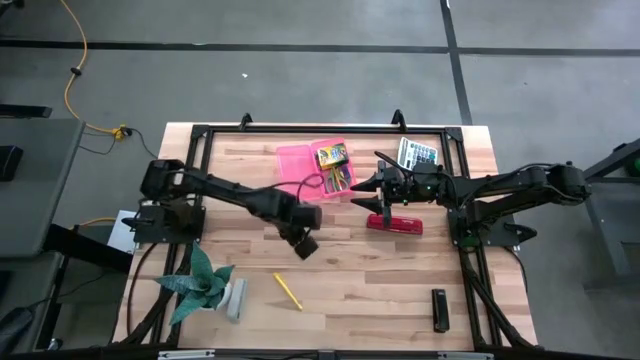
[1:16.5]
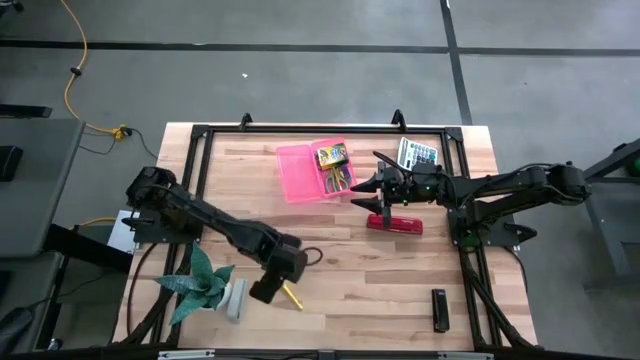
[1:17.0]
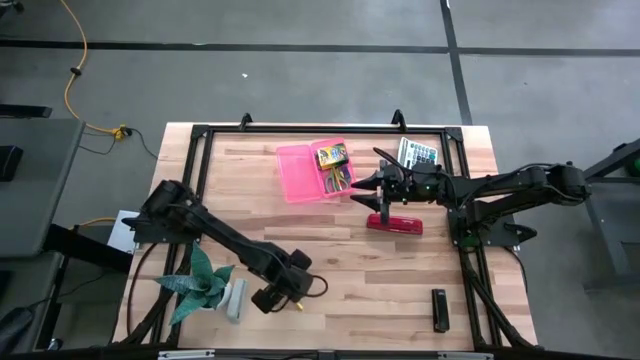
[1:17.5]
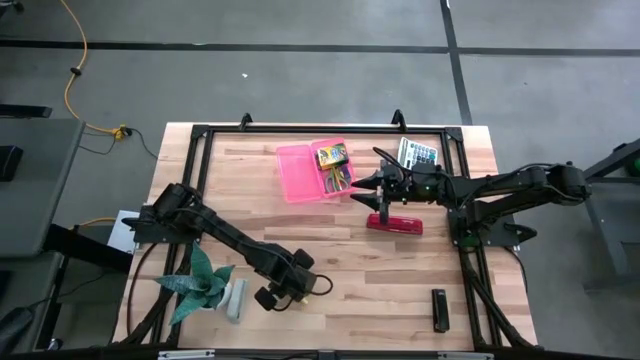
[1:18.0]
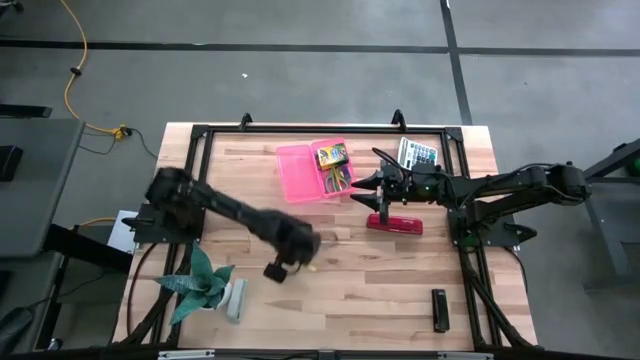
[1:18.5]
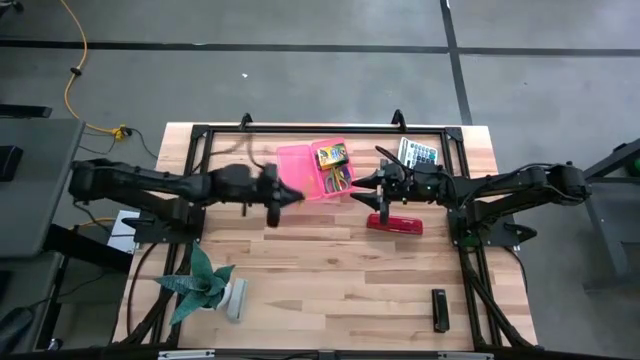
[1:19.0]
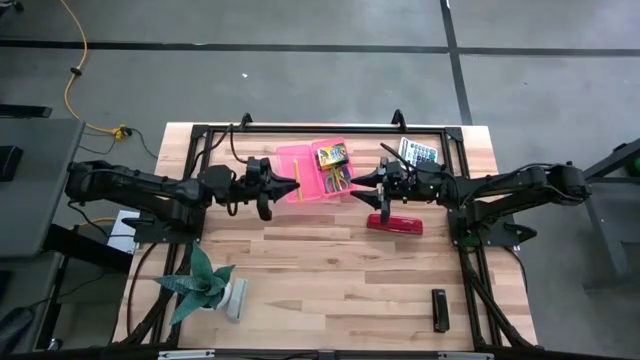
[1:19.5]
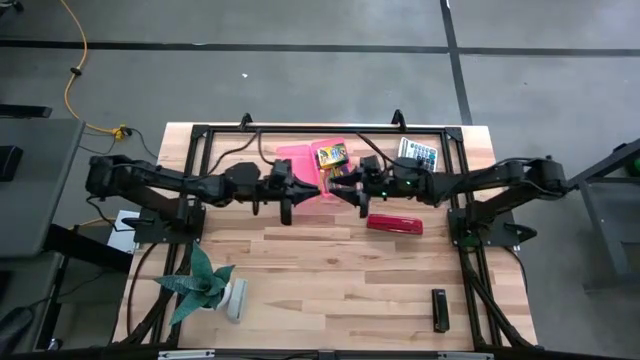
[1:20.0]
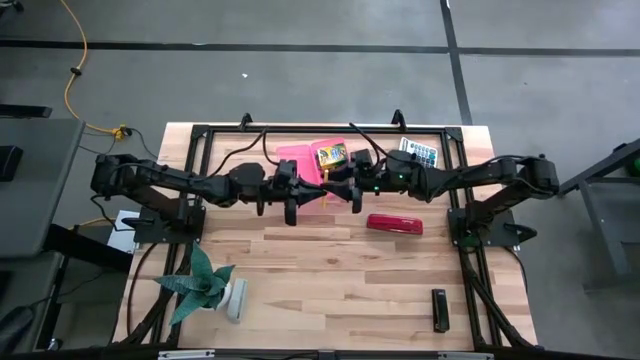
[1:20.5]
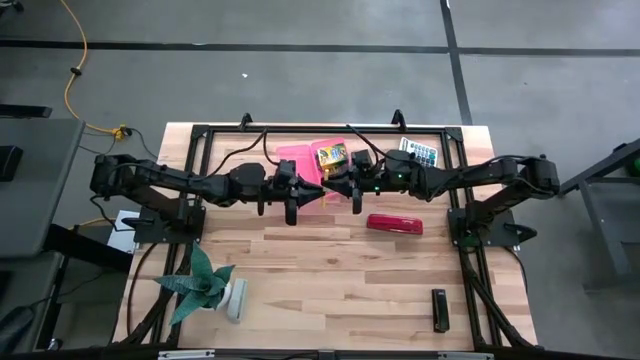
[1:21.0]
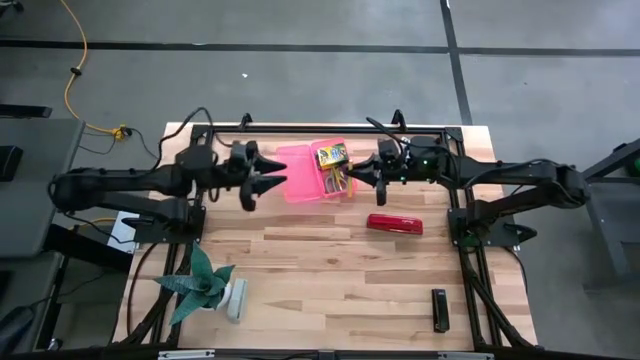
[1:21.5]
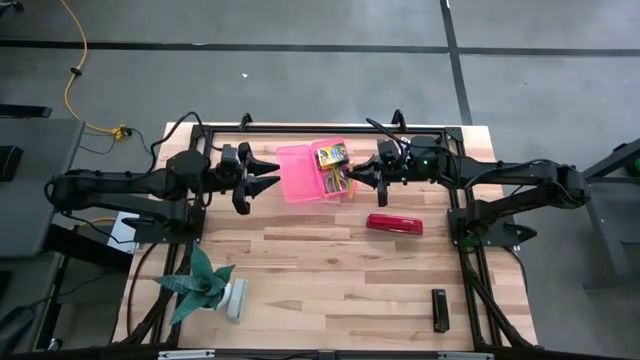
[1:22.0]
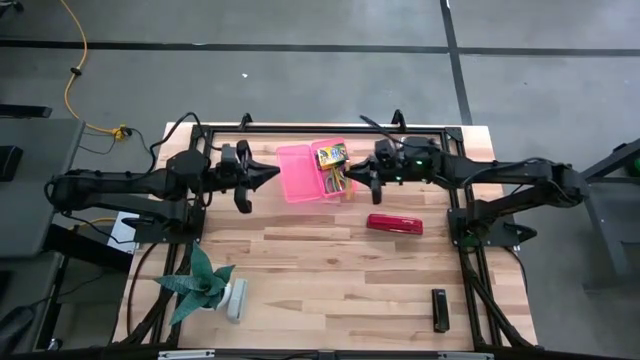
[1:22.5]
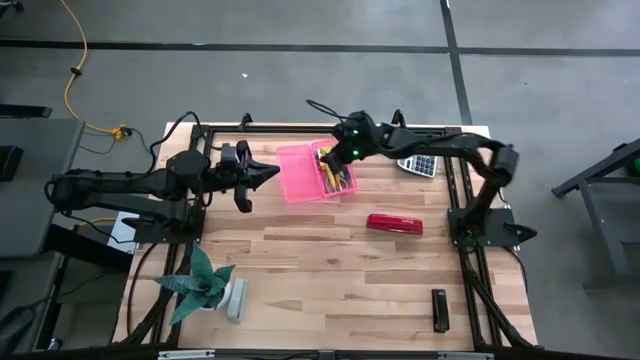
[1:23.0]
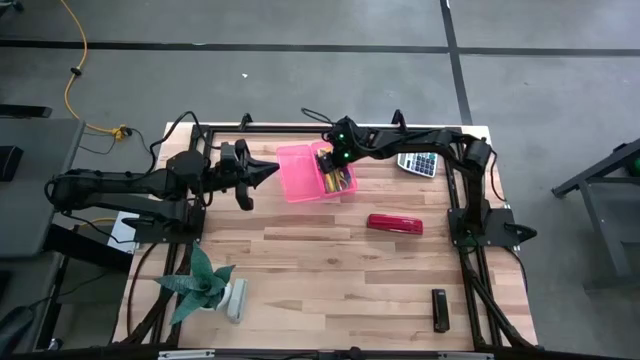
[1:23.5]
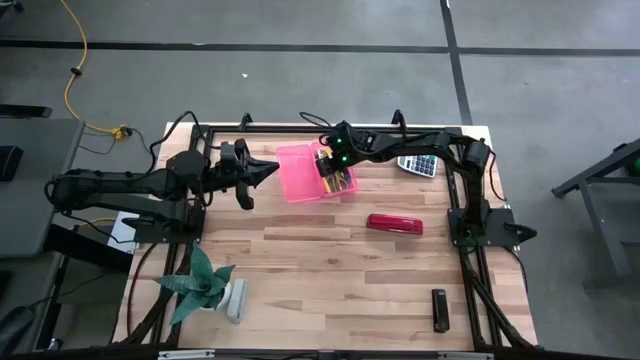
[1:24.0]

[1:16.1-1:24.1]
Task: Pack school essentials
Put the yellow pen into the pink supply box

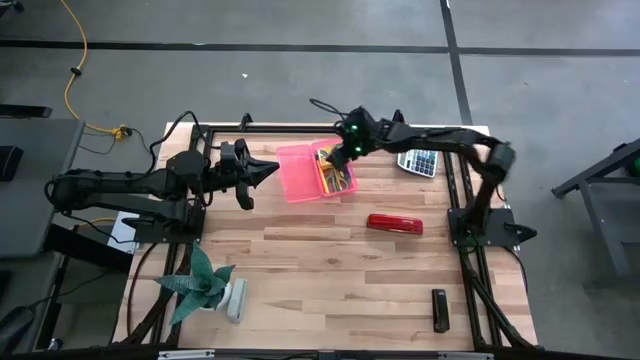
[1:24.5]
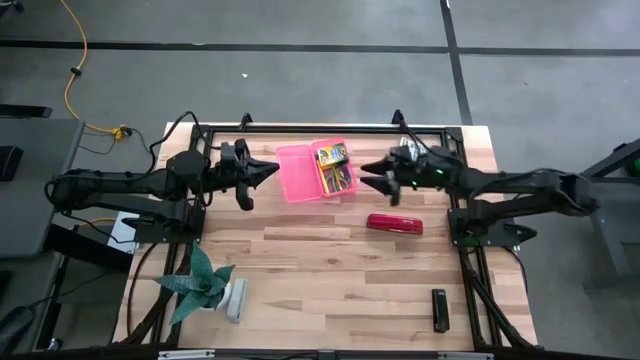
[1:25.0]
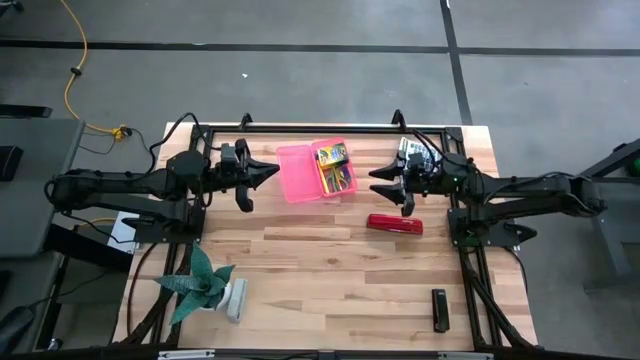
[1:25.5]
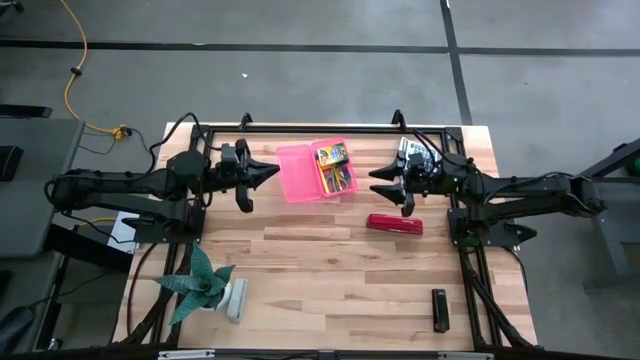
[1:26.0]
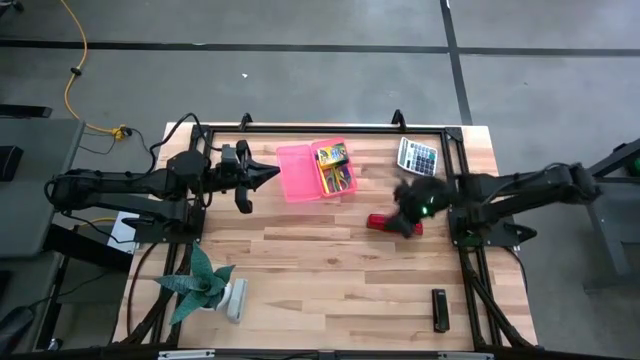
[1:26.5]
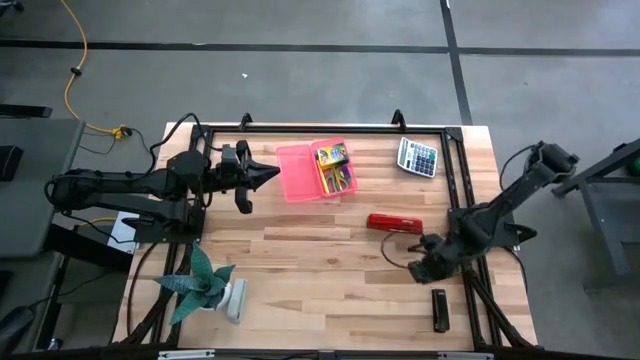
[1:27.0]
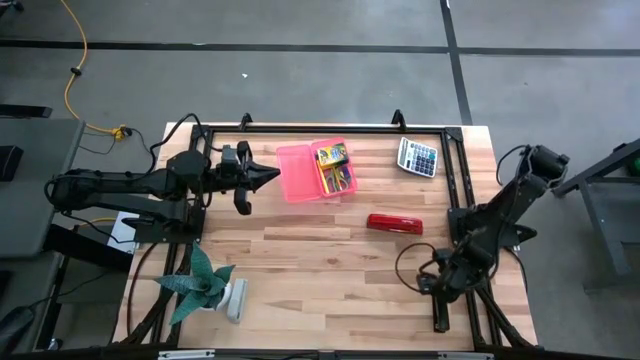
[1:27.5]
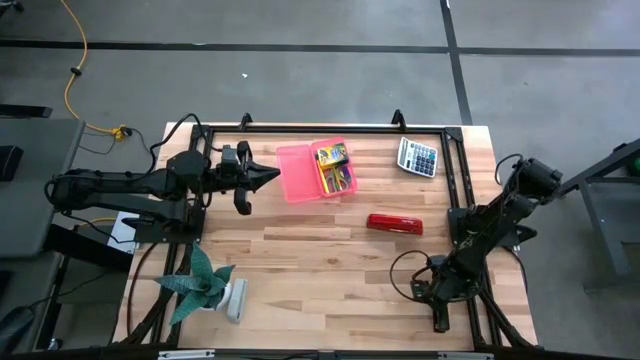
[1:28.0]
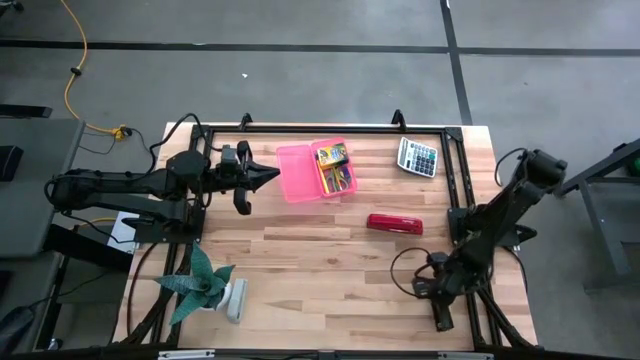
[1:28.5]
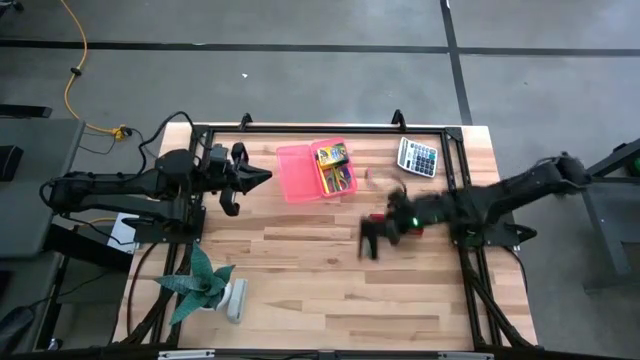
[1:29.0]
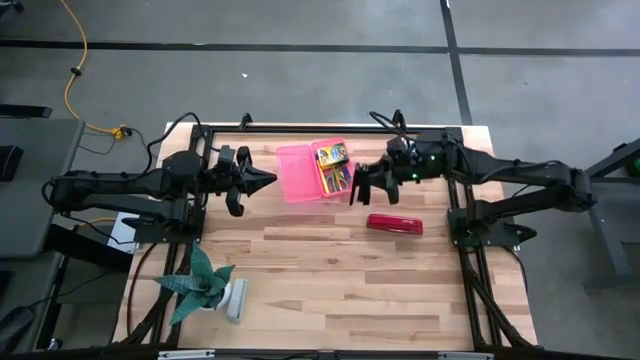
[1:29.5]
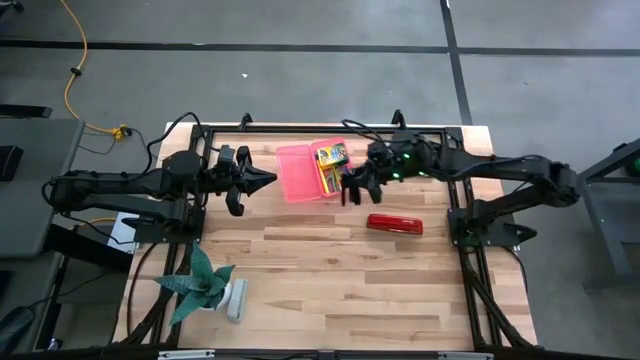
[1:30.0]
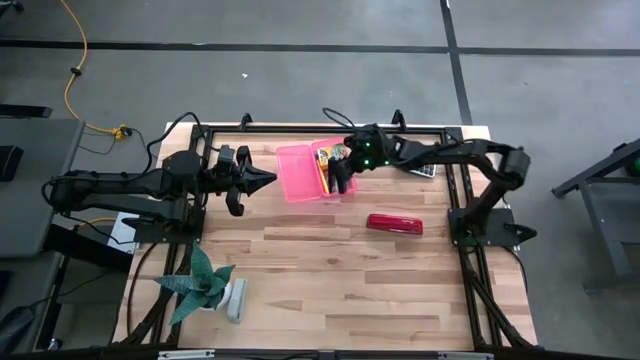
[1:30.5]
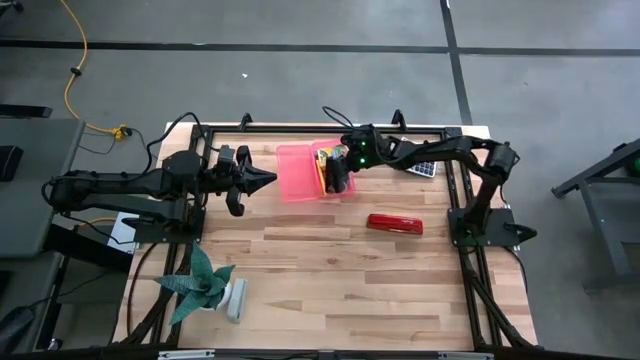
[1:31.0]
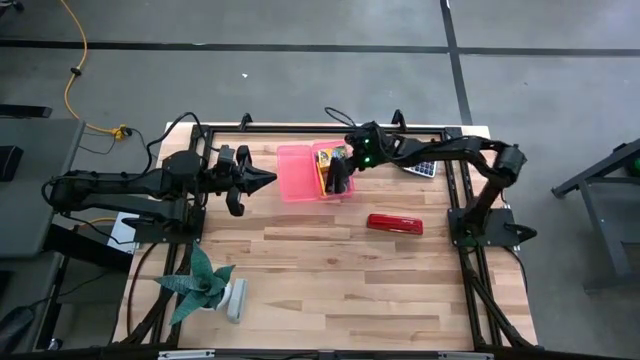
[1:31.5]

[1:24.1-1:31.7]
Put the black stapler into the pink supply box

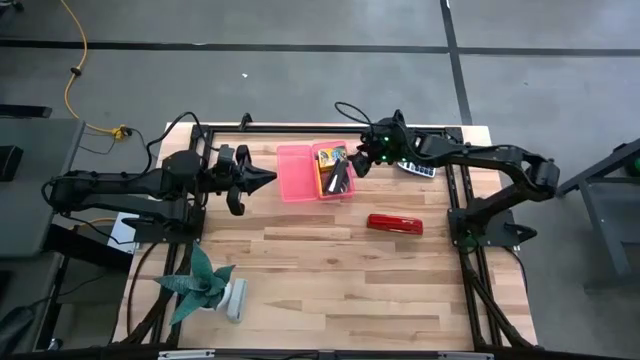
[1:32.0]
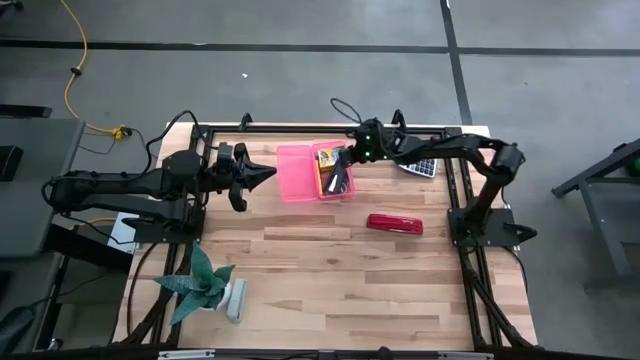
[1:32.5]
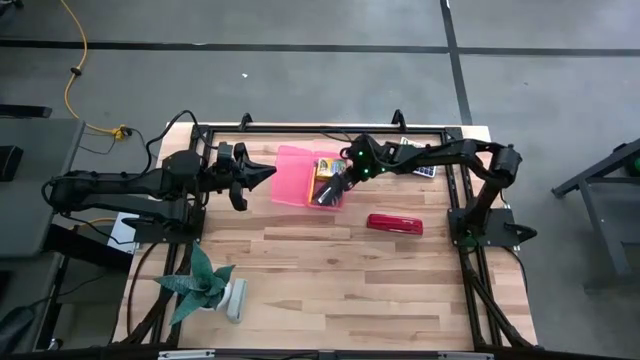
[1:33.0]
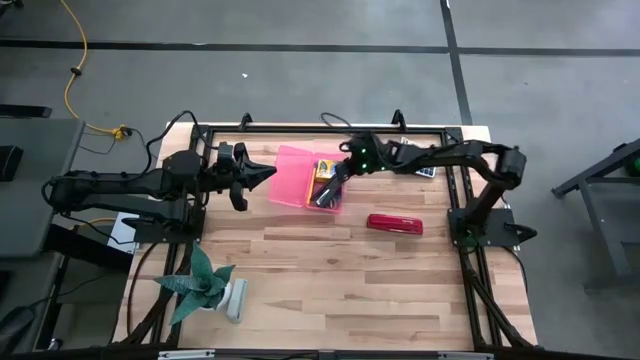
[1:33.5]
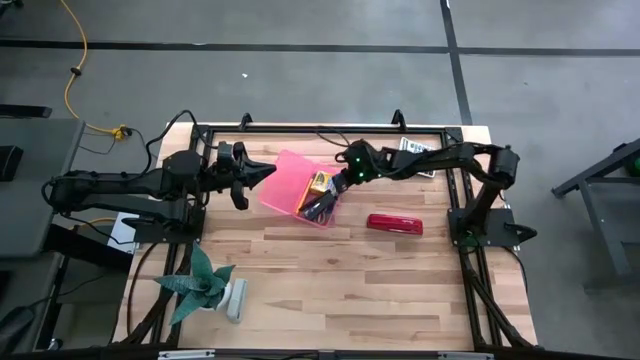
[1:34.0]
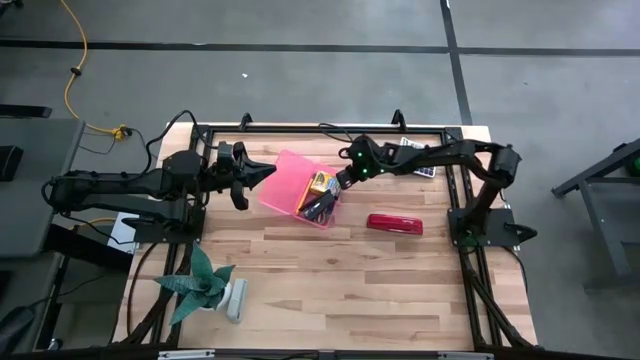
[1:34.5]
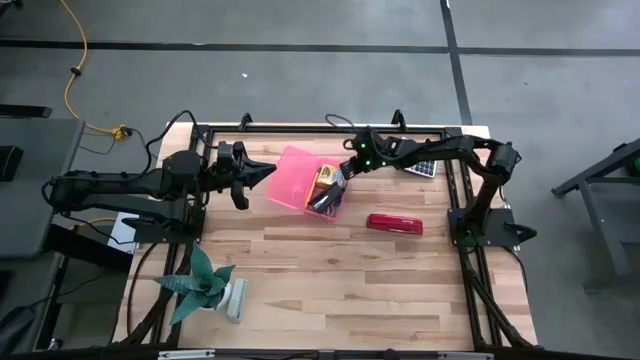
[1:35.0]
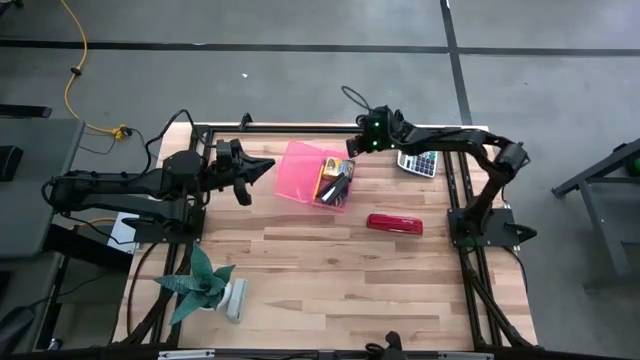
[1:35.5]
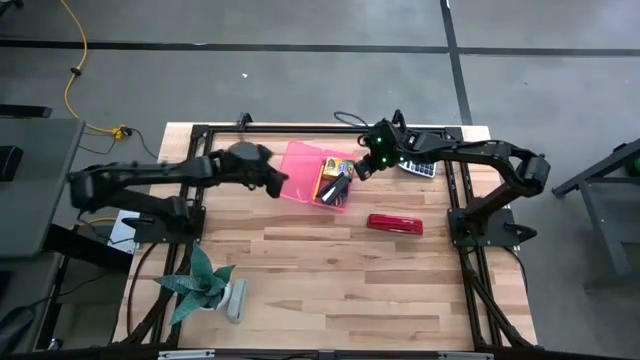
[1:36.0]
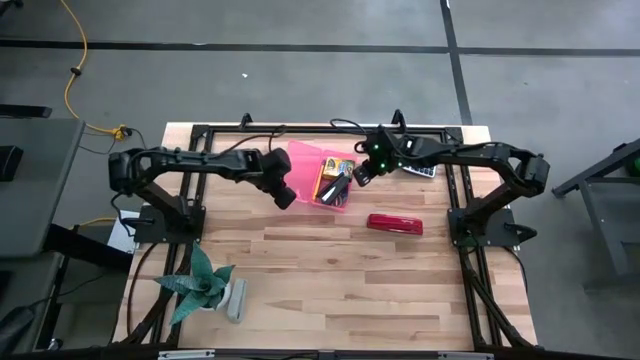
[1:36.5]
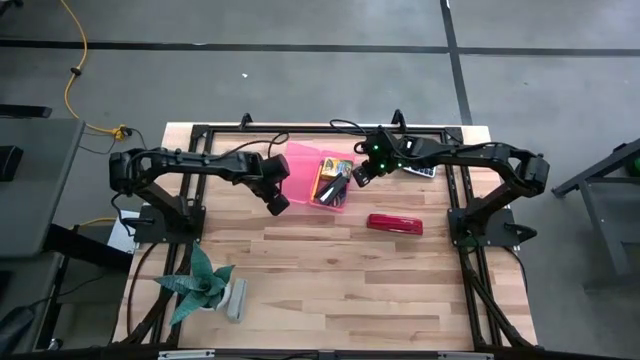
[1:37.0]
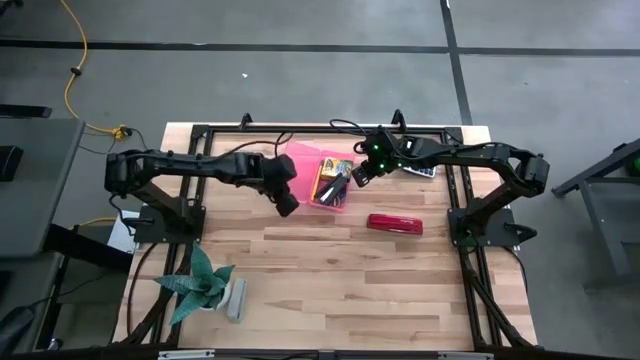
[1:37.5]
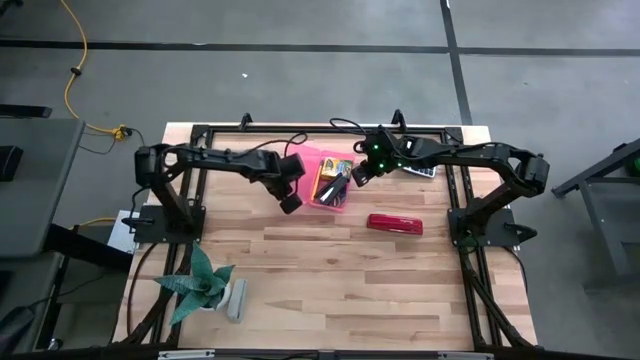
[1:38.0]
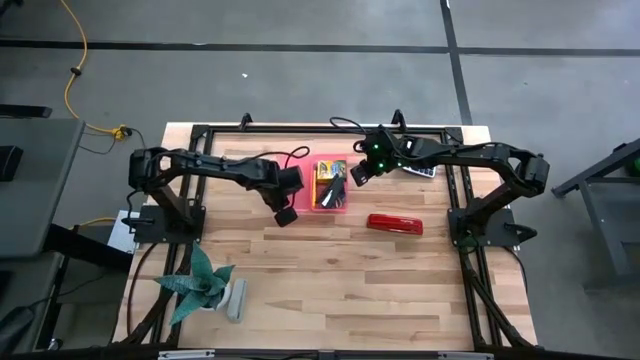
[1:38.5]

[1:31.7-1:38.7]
Adjust the pink supply box on the table
